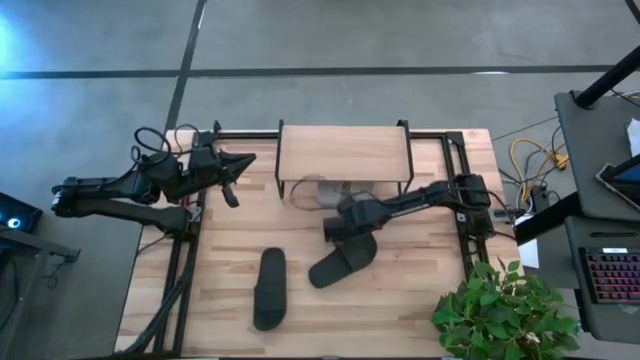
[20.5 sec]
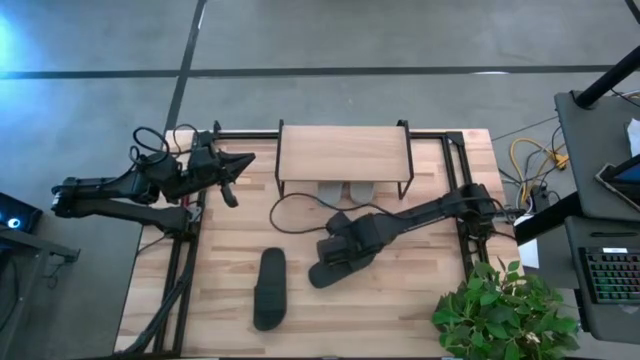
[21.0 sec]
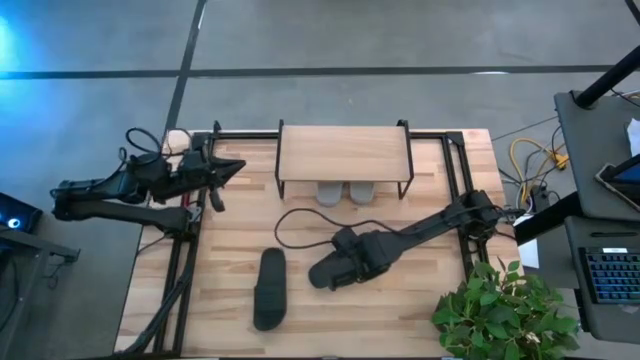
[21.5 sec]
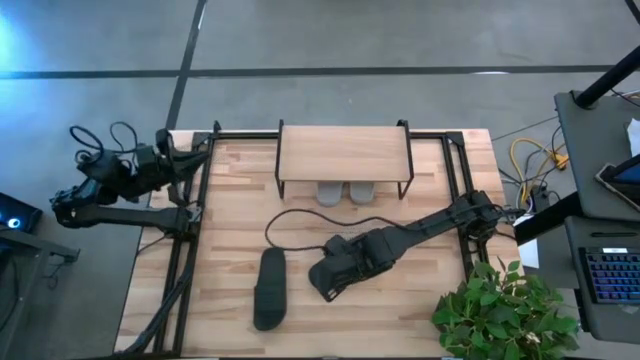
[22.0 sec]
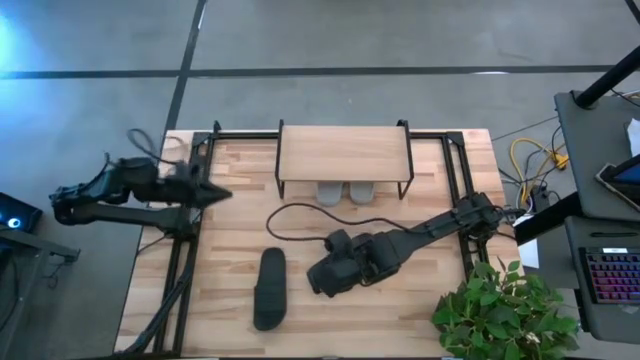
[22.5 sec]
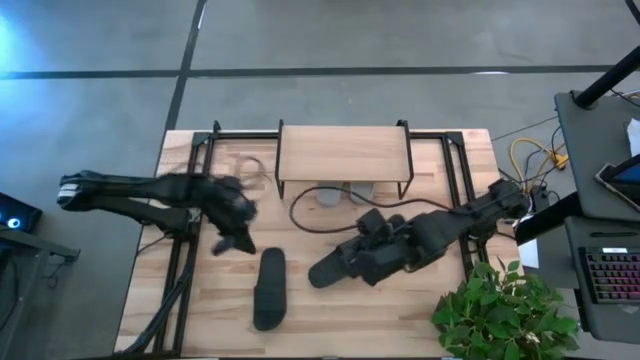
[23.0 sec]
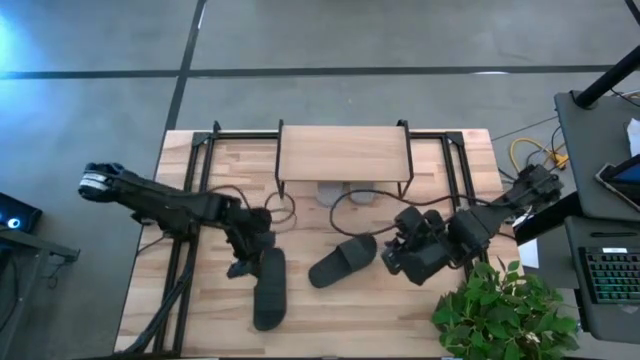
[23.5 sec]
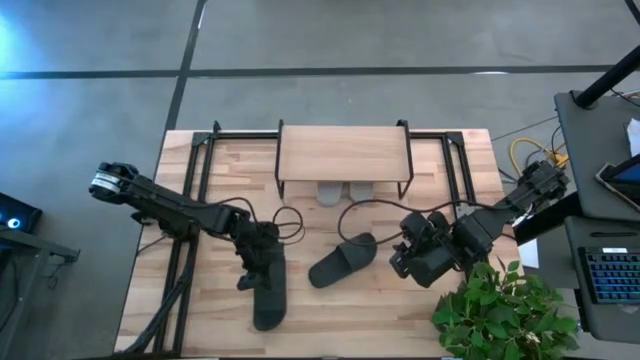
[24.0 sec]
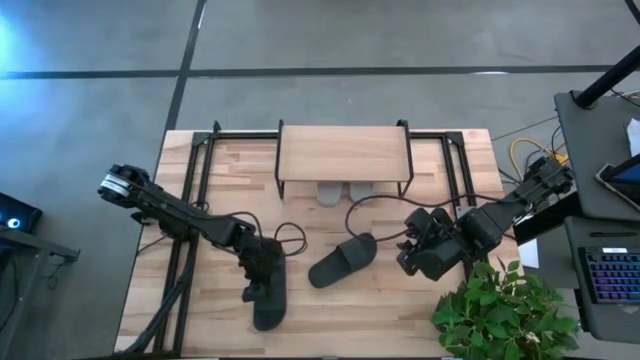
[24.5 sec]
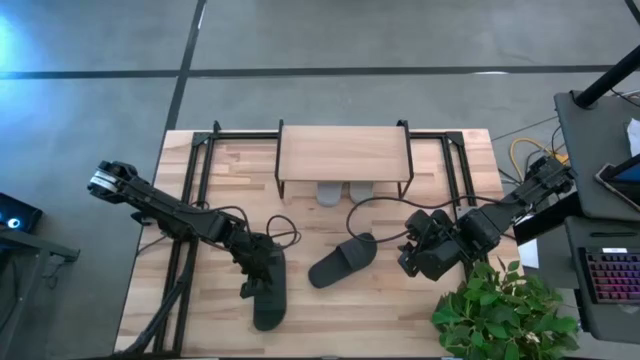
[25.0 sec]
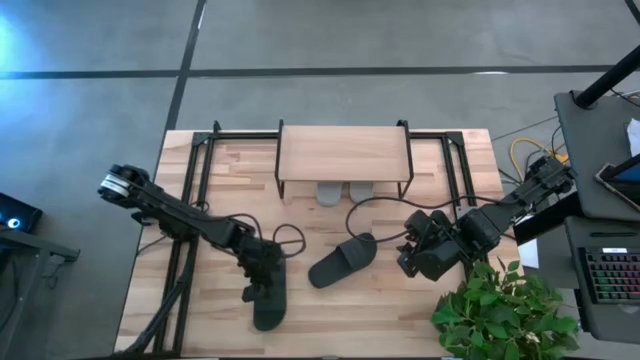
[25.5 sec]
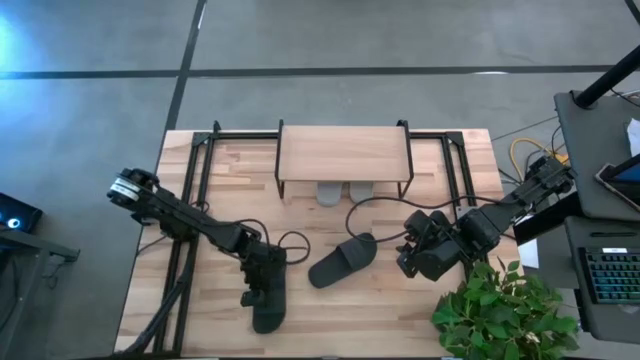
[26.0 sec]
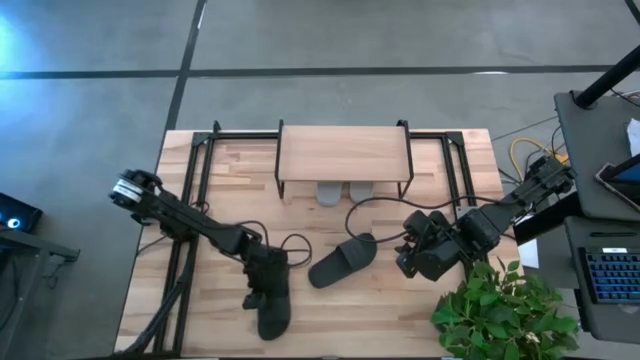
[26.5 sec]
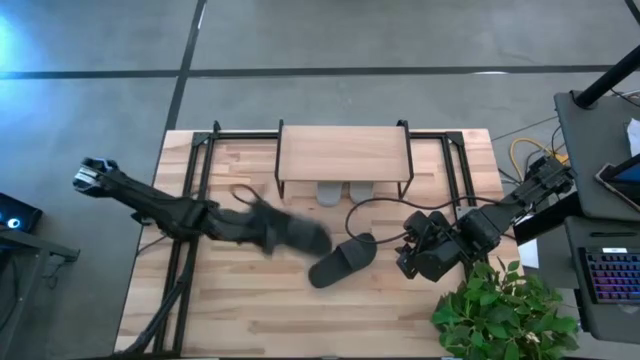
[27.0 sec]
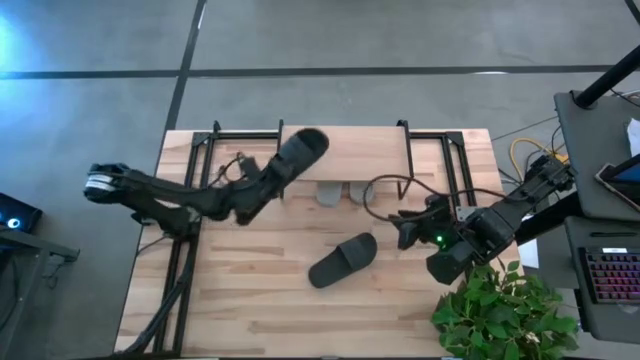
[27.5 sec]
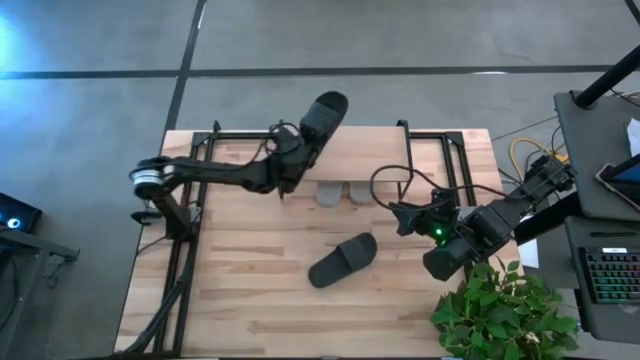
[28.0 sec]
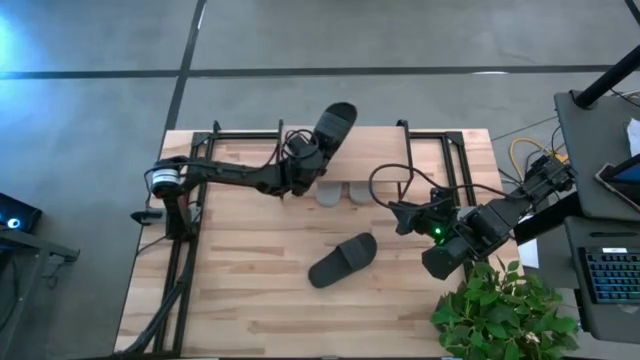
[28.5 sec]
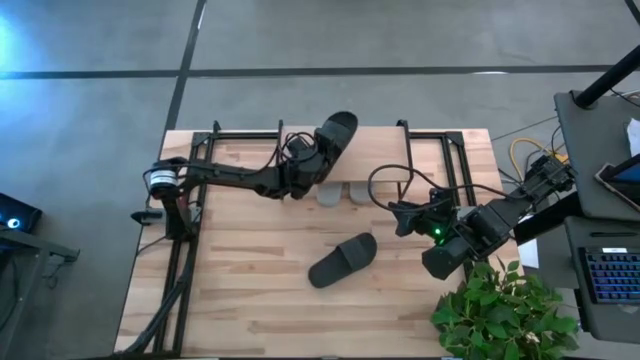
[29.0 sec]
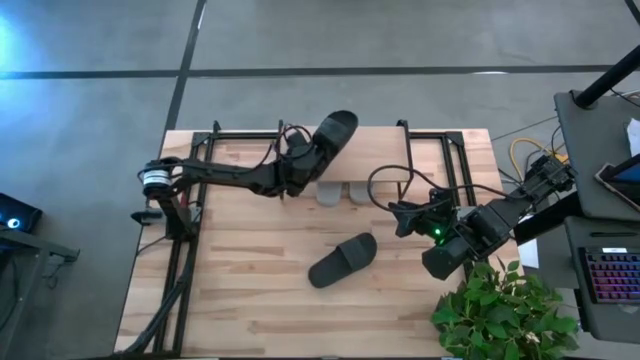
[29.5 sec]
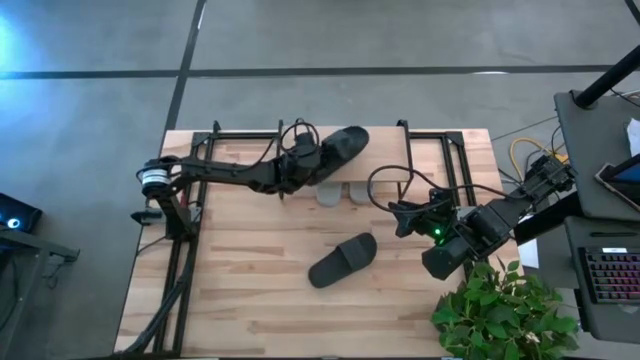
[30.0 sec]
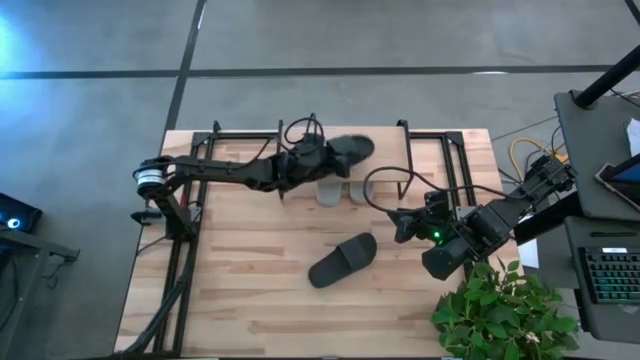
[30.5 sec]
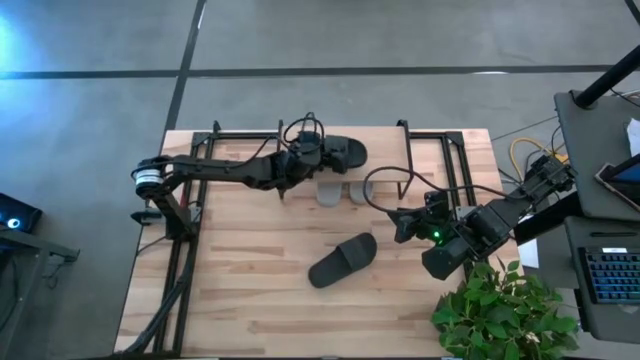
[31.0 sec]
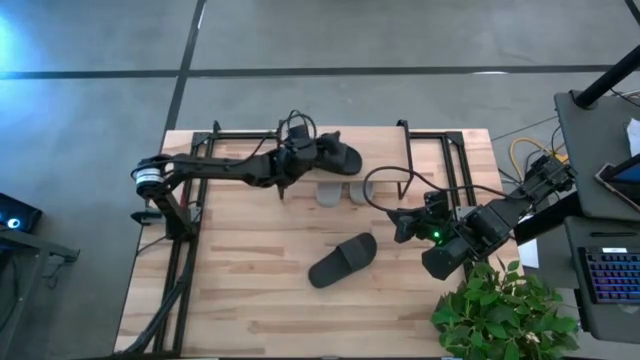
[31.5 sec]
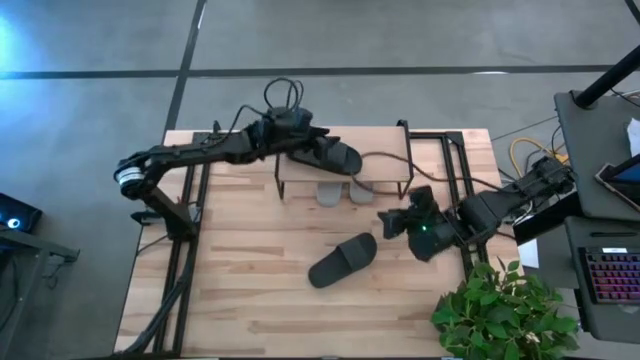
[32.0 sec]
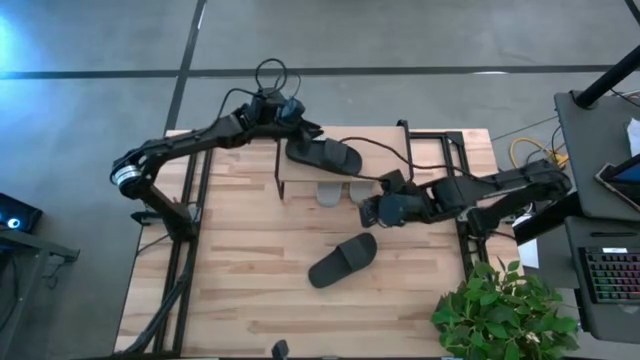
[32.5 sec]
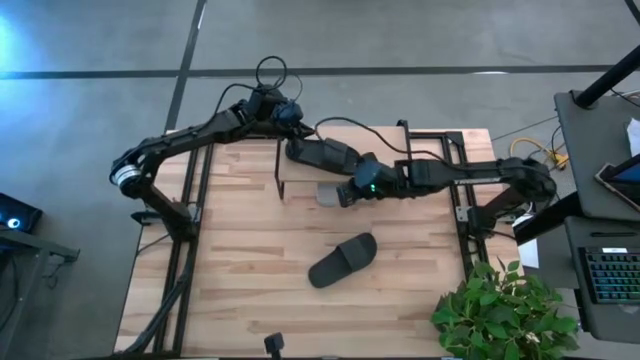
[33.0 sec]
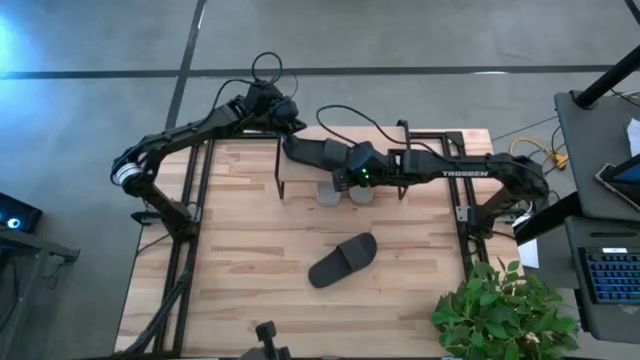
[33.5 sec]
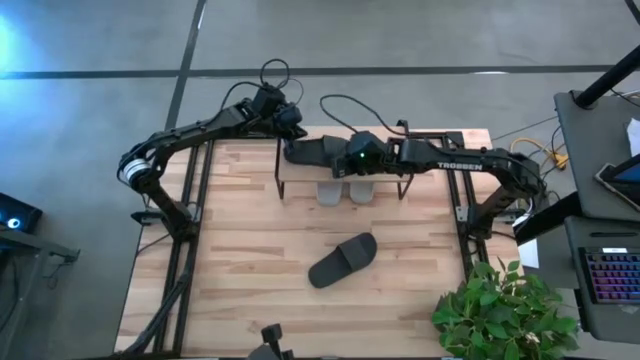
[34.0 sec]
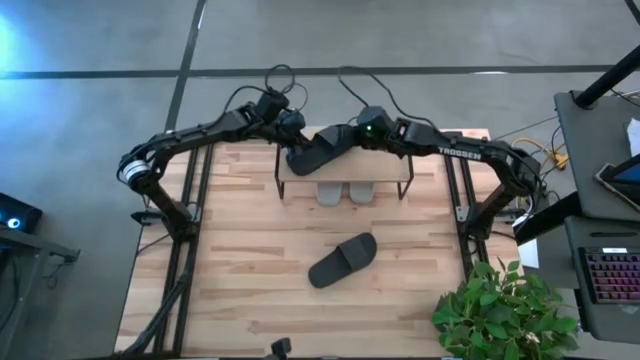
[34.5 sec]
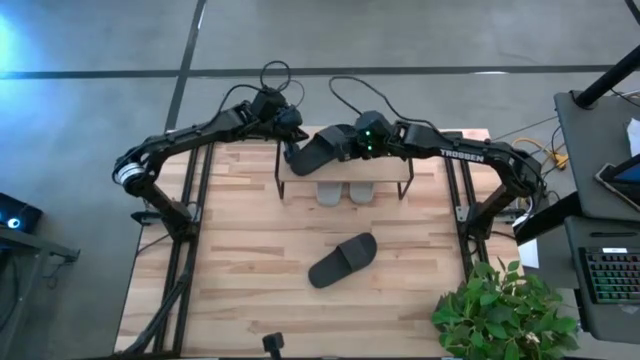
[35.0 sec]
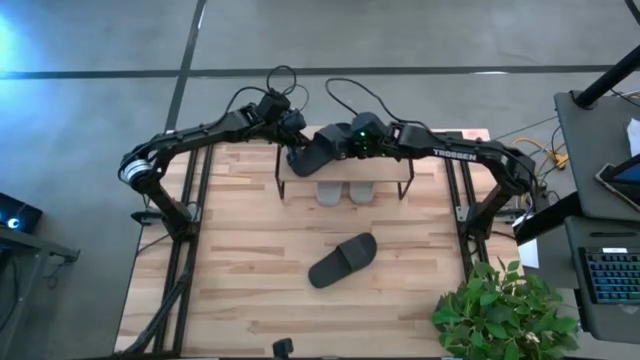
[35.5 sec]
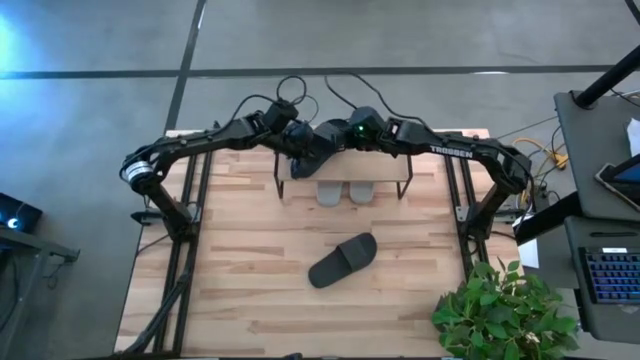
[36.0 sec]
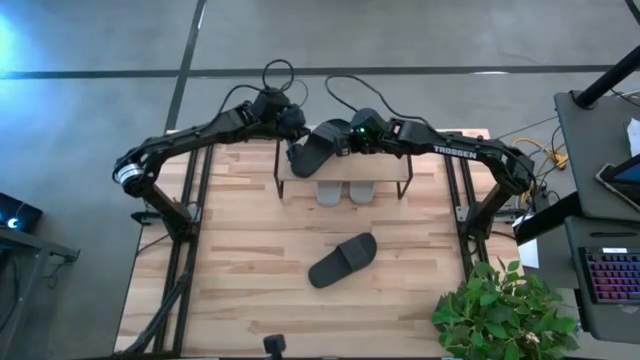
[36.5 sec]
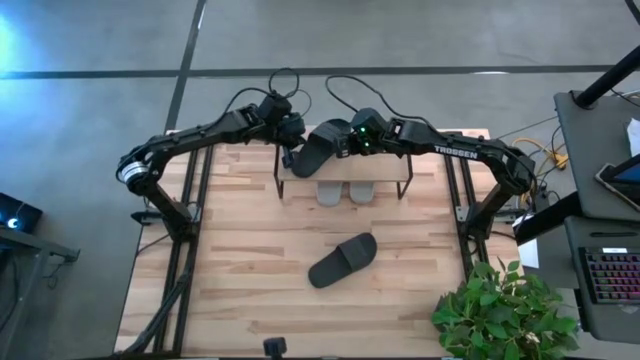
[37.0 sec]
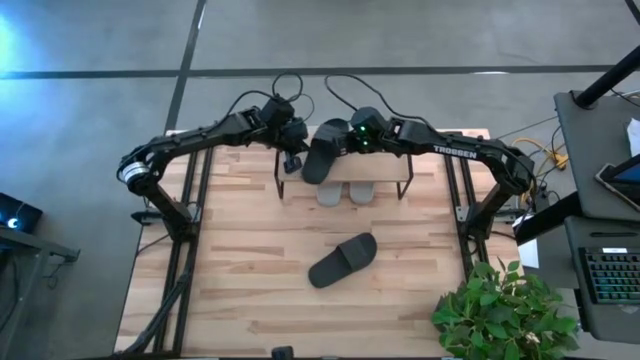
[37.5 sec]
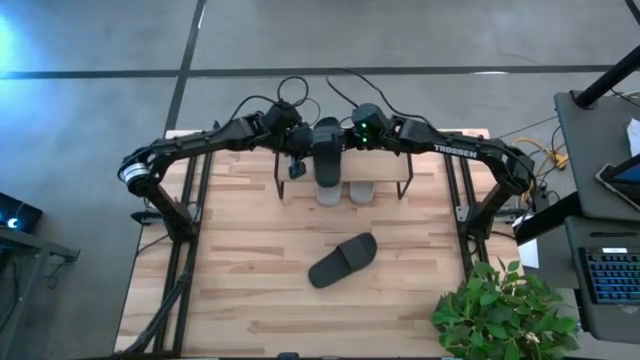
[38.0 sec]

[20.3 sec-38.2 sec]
Task: Pick and place slides into the shelf
Put the left black slide on the shelf

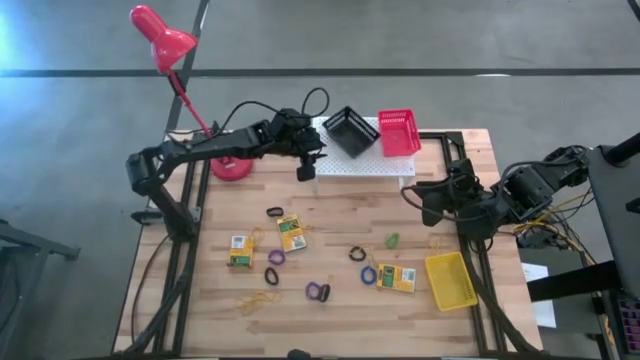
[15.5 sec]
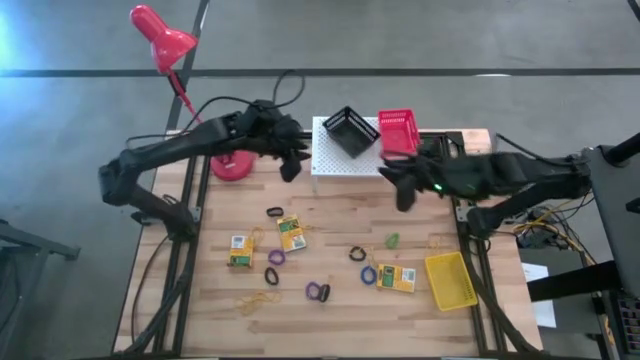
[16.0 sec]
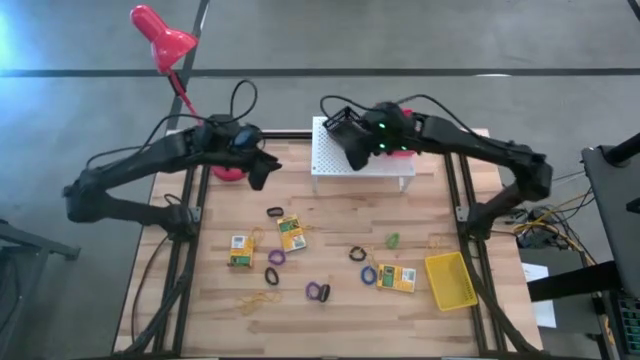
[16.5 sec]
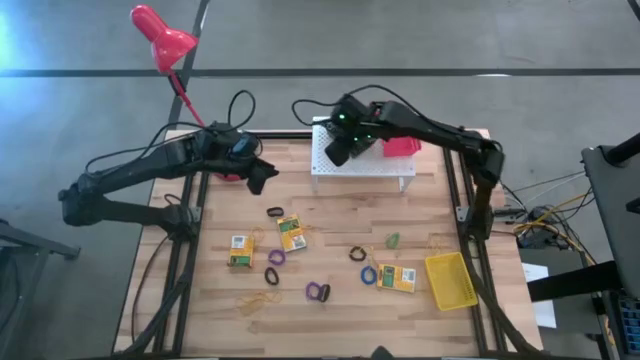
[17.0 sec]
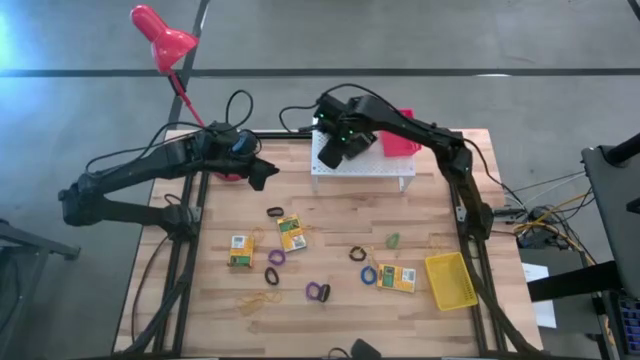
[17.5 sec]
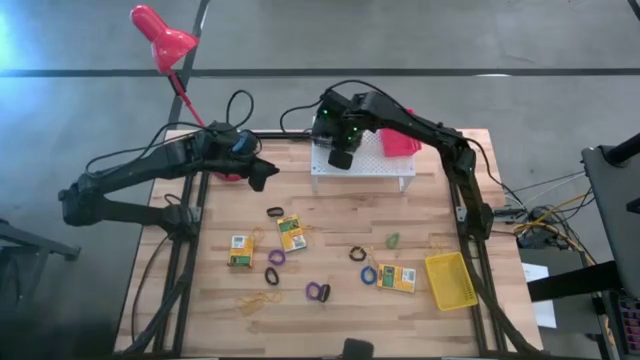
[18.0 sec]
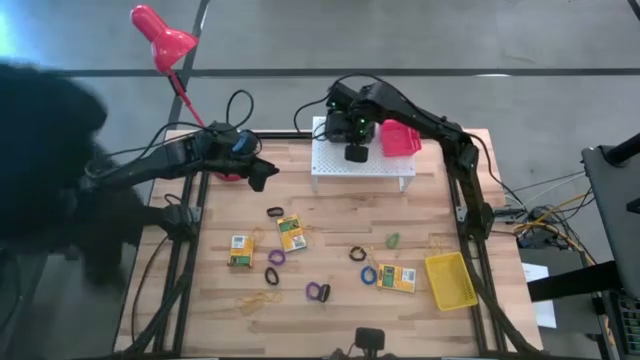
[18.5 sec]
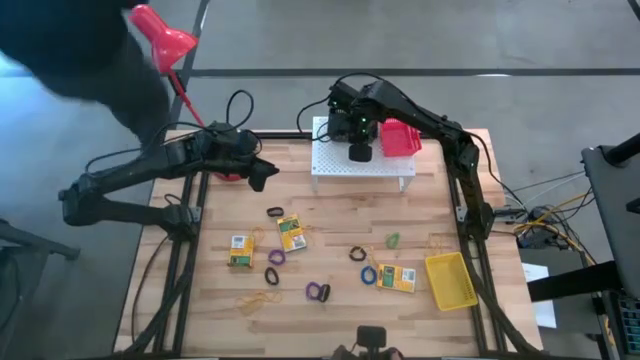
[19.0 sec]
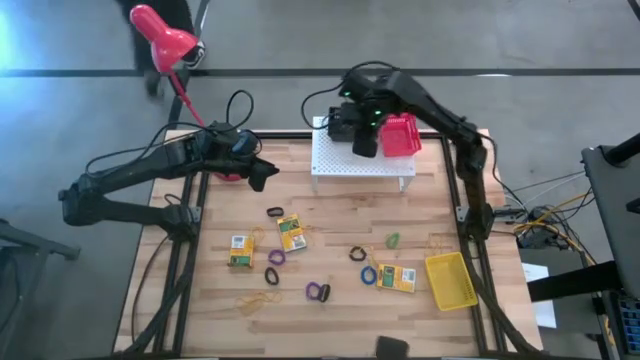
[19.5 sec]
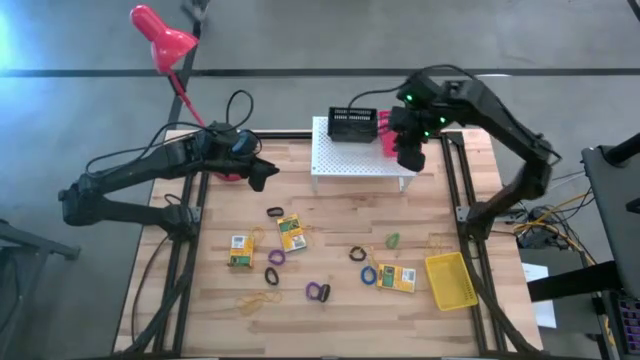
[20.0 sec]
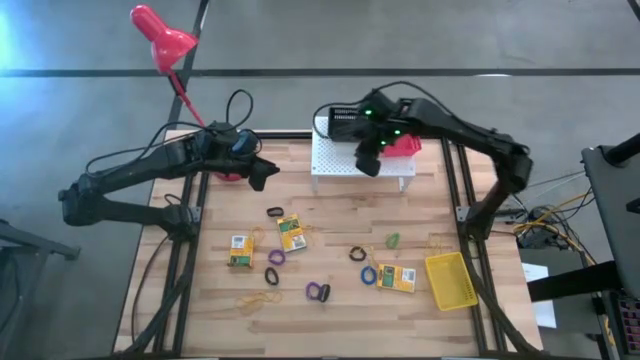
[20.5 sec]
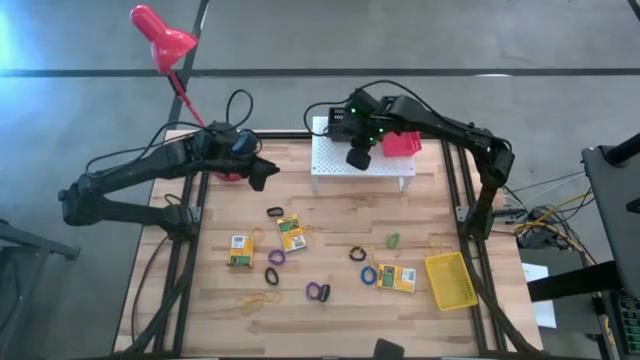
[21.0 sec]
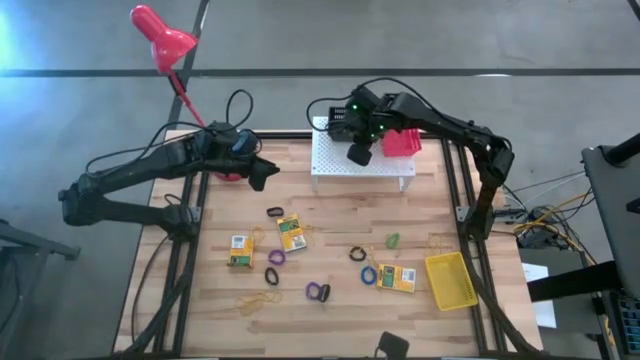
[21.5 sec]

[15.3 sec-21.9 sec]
Task: Pick & Place Office Desk Supplies
Put the black bin on the shelf
